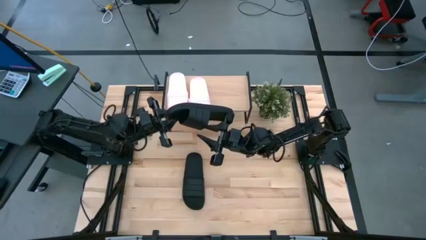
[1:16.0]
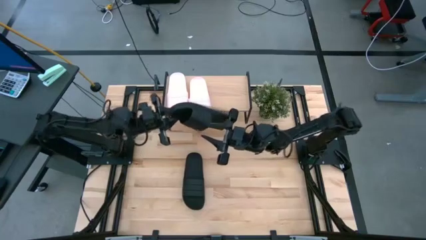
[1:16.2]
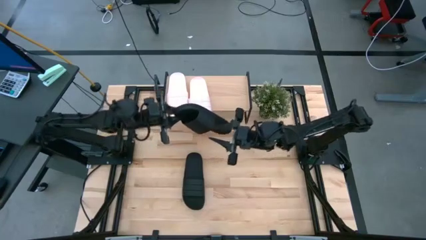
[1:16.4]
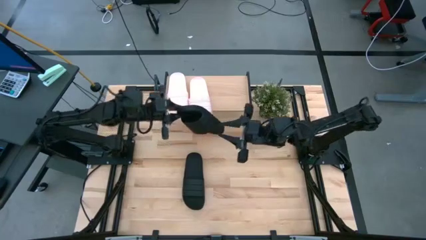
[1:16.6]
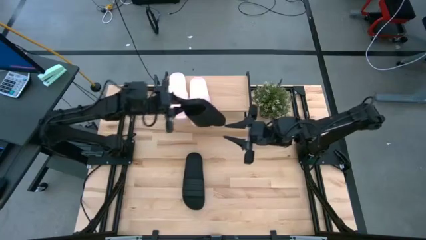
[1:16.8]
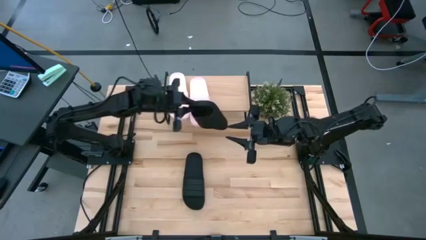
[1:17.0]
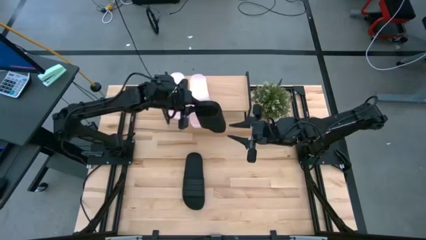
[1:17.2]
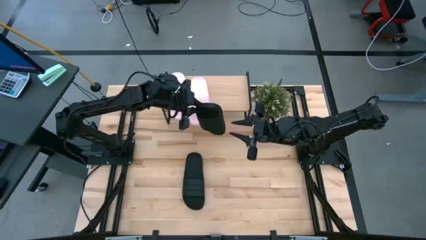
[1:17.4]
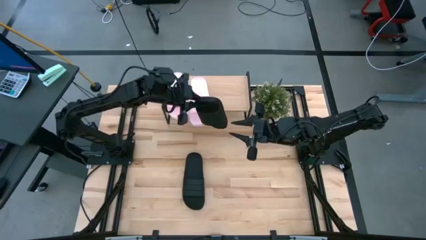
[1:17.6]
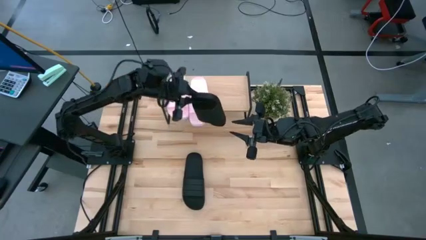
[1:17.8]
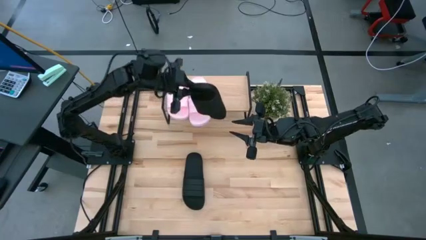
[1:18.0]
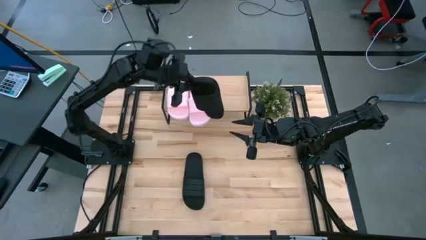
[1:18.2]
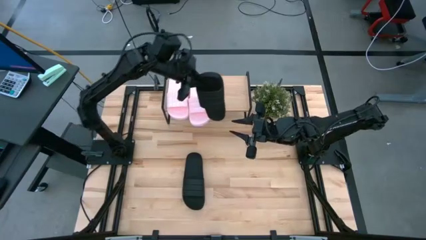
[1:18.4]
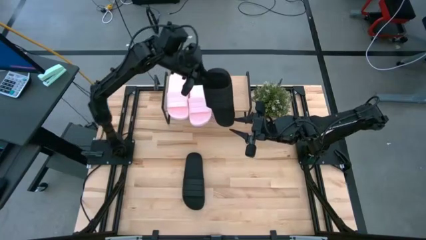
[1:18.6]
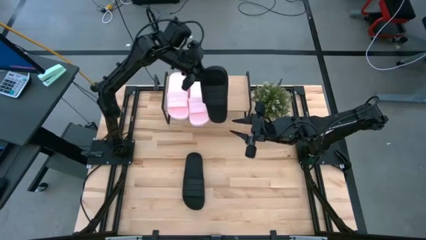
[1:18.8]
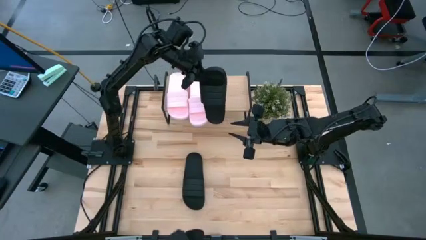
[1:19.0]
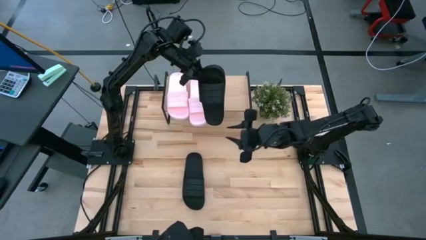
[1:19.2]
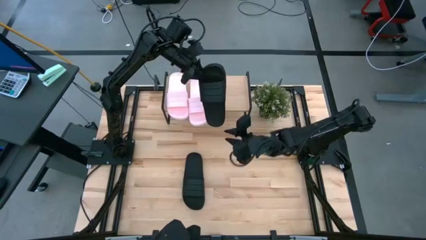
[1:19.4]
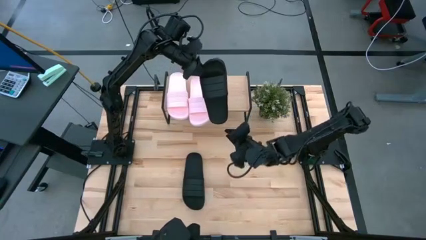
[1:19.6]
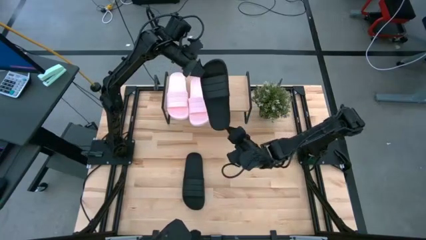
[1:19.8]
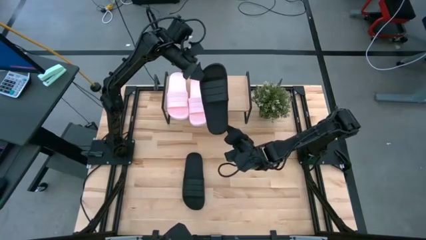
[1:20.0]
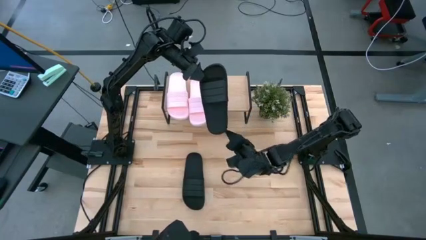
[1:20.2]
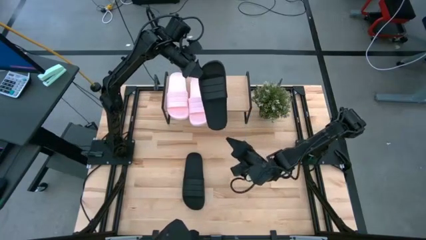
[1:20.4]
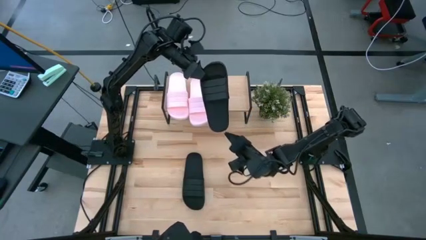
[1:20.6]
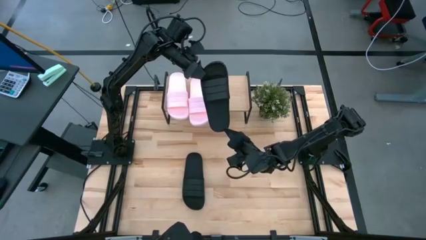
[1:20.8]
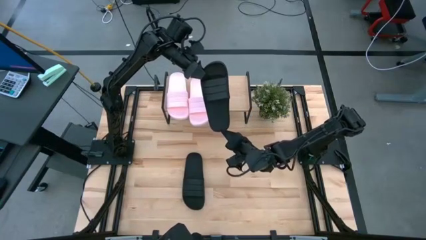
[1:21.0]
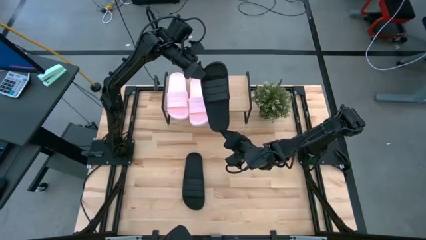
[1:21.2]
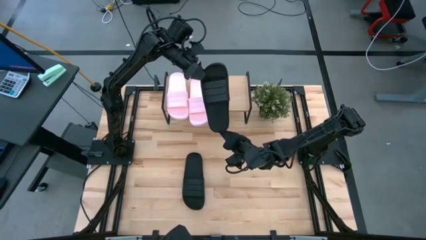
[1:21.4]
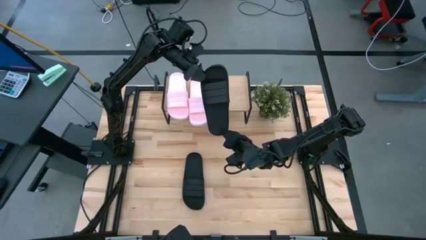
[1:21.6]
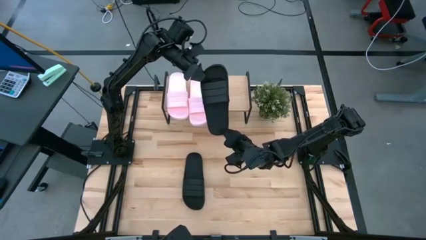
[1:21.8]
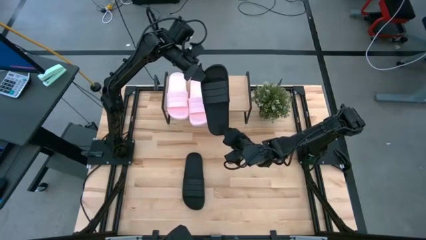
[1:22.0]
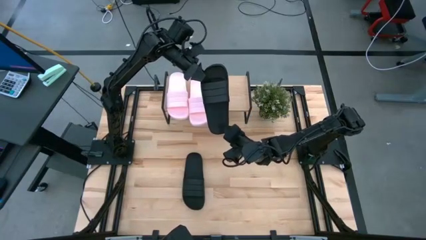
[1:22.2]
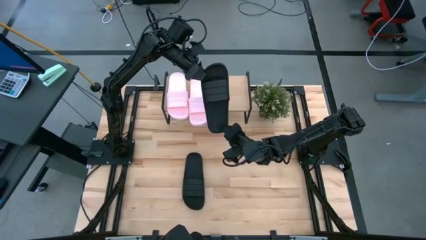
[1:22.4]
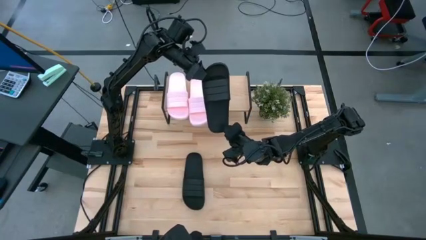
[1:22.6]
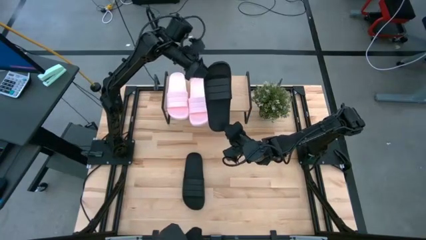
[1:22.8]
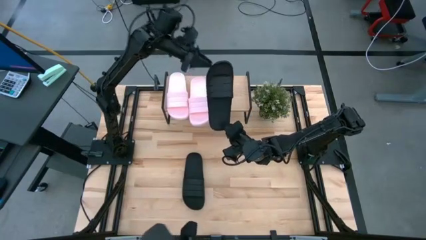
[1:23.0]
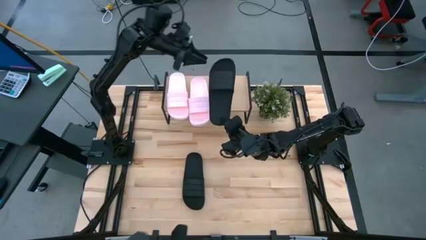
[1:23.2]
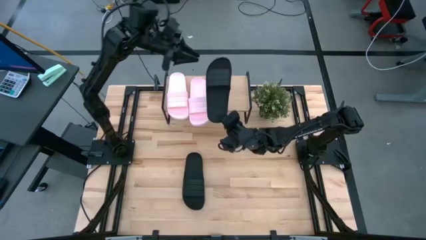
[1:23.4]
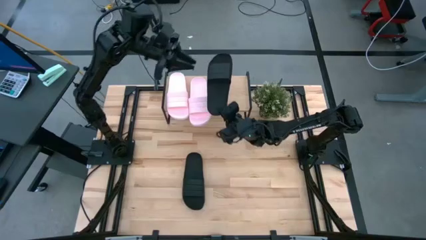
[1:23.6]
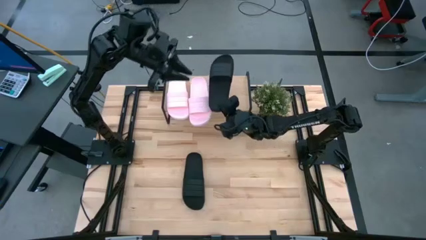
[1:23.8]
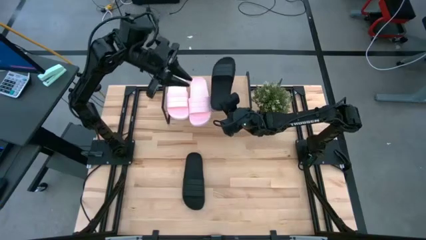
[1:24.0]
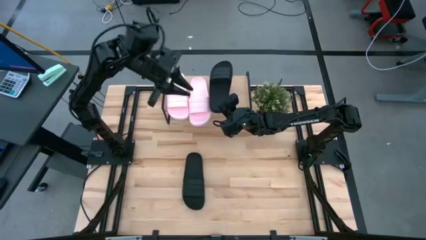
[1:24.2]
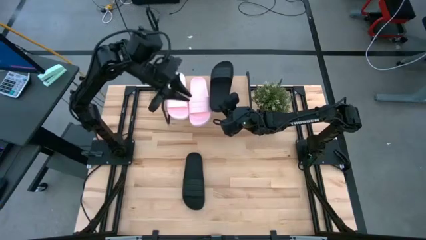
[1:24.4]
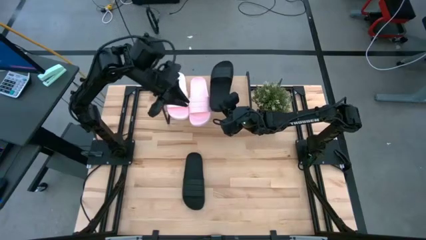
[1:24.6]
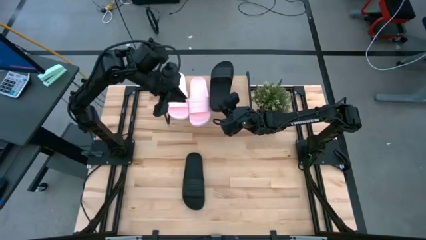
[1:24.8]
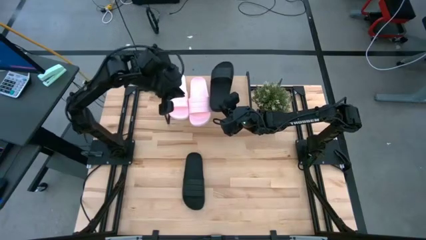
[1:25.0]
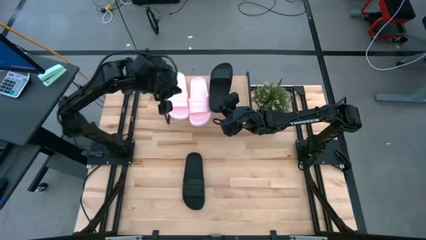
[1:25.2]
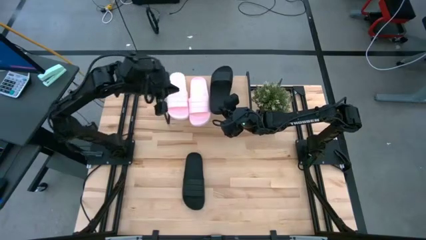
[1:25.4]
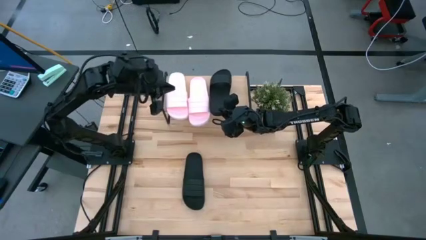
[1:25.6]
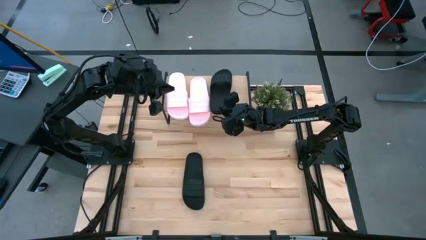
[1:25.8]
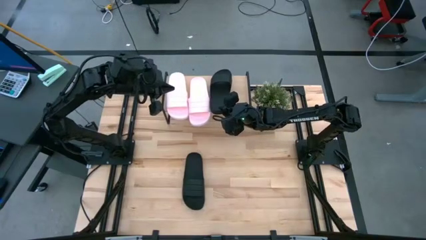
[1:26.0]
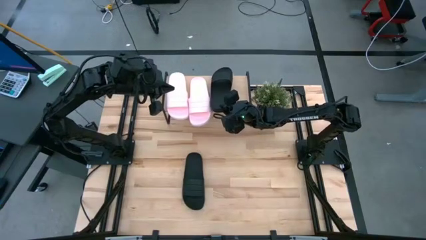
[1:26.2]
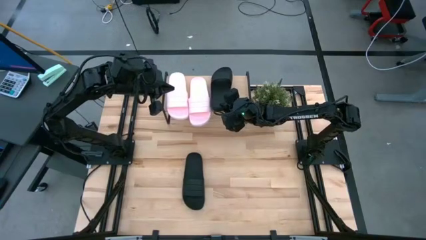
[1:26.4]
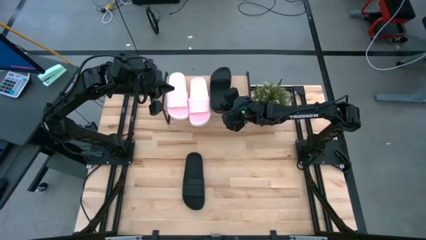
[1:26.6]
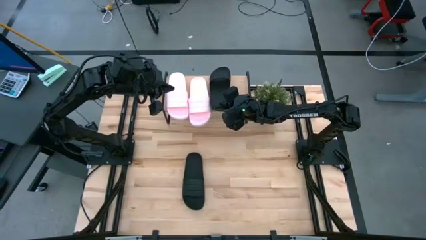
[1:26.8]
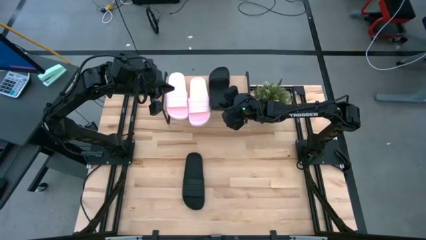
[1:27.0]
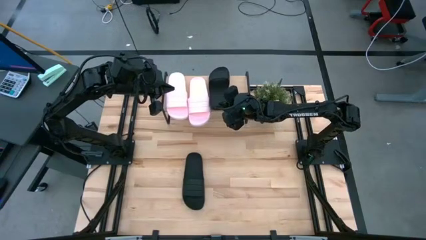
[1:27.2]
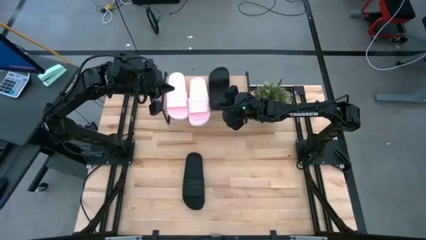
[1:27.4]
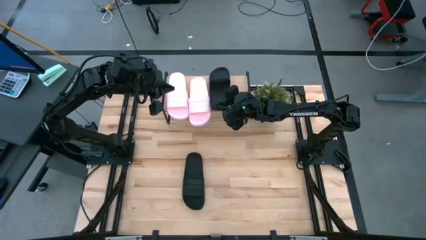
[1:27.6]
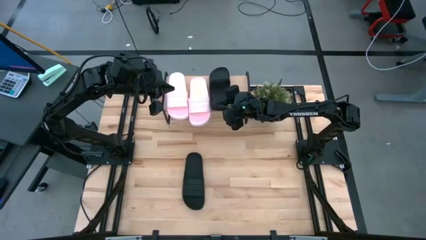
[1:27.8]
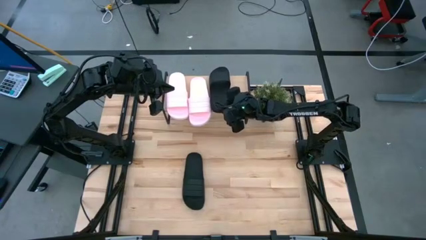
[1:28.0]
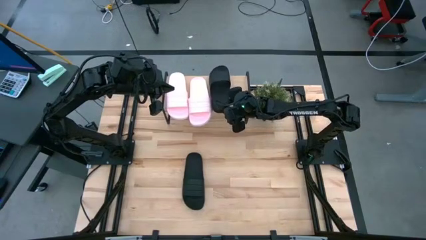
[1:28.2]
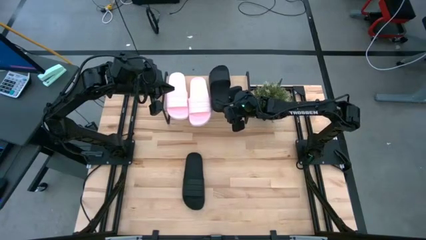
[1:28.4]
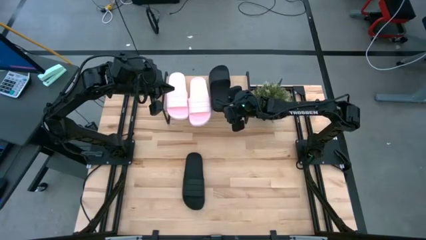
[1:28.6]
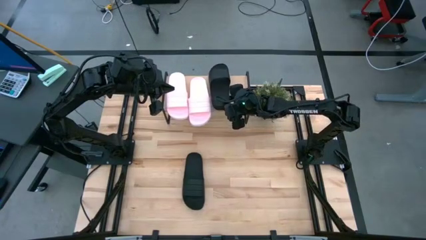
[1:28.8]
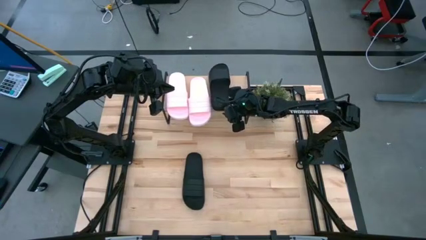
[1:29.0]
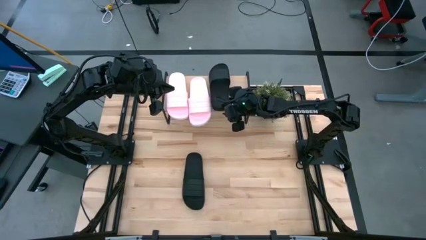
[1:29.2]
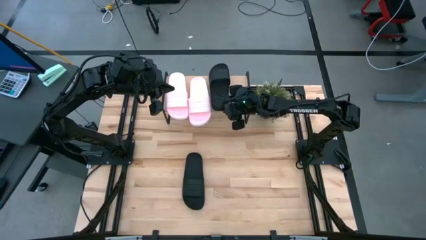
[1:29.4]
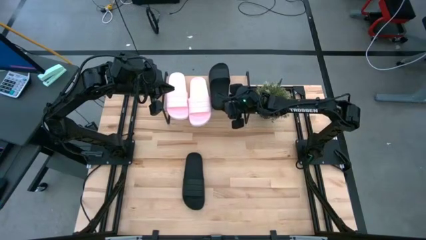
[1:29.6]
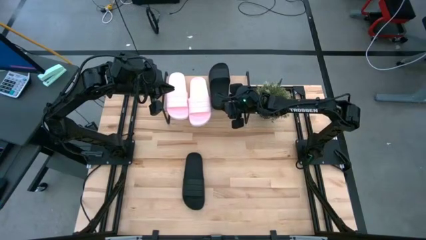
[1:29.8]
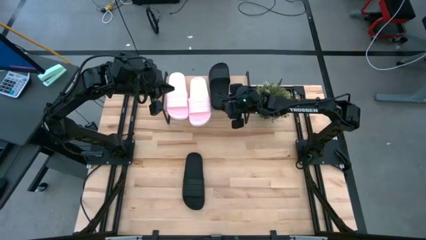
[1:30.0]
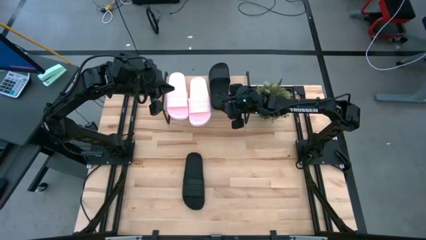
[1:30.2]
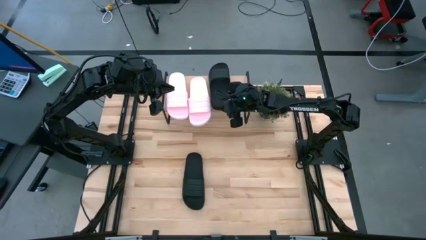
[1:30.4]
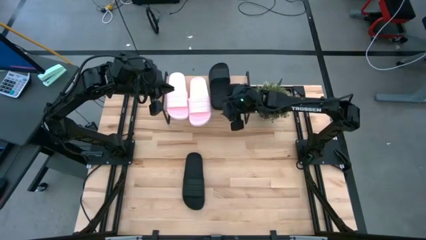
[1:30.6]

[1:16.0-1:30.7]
Task: Pick and place slides into the shelf
Put the right black slide on the shelf
